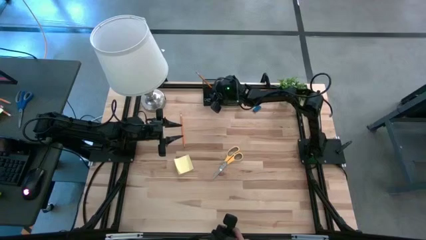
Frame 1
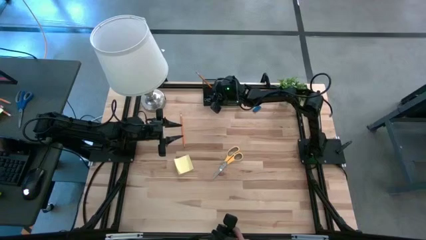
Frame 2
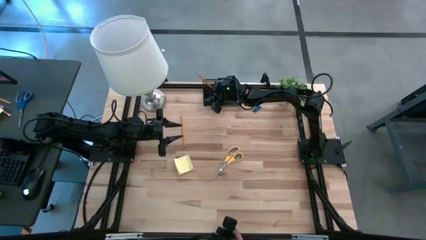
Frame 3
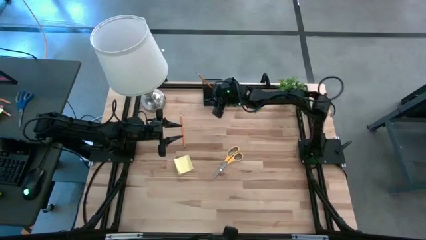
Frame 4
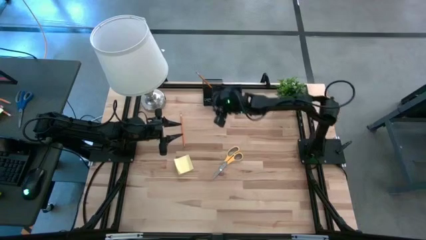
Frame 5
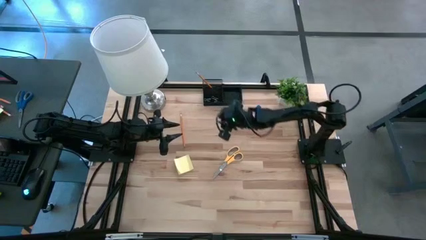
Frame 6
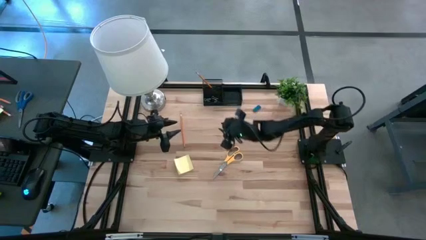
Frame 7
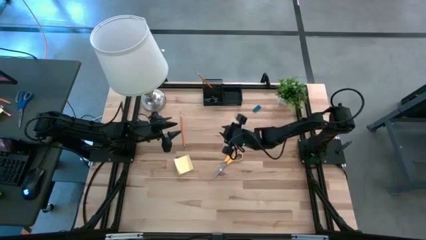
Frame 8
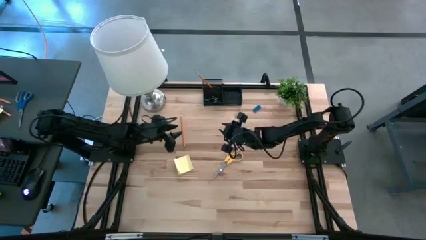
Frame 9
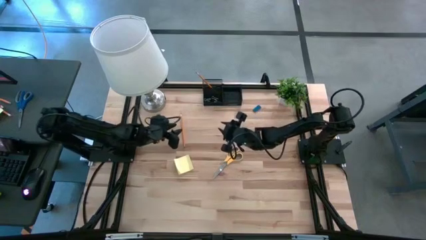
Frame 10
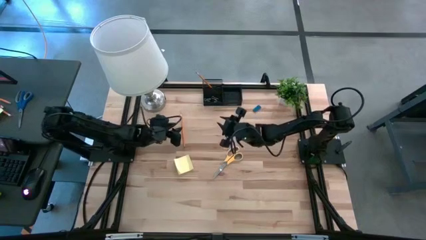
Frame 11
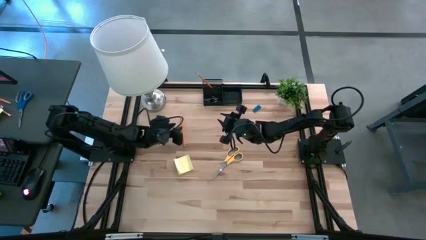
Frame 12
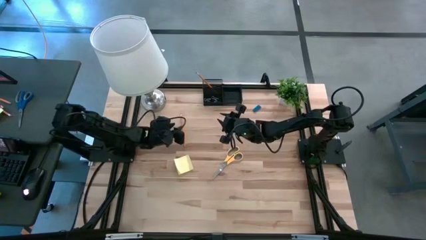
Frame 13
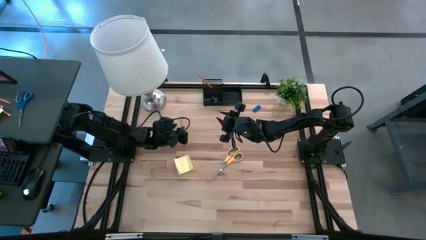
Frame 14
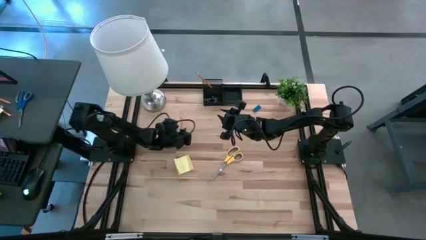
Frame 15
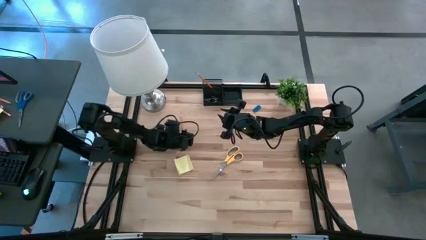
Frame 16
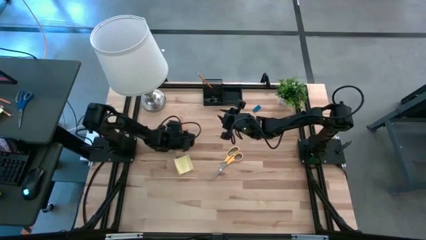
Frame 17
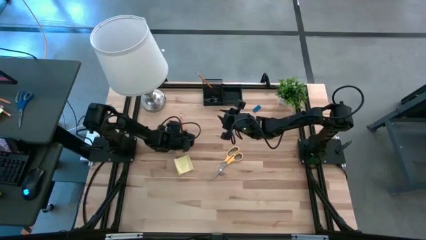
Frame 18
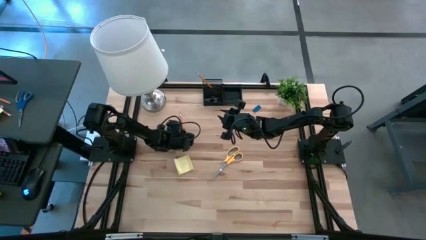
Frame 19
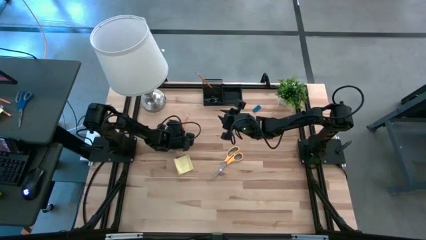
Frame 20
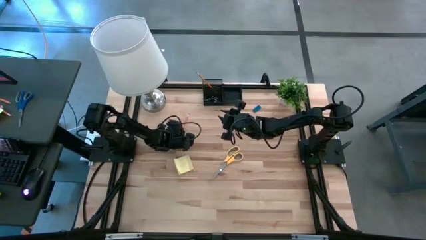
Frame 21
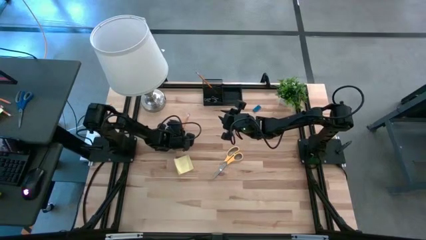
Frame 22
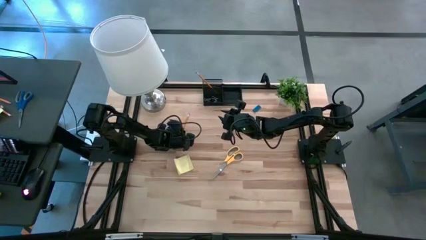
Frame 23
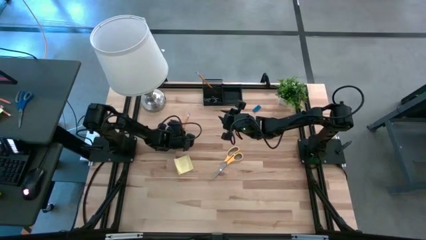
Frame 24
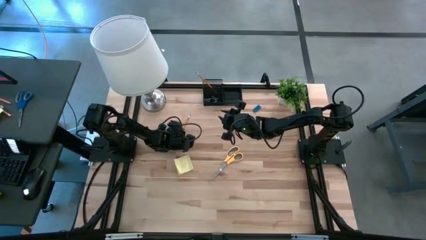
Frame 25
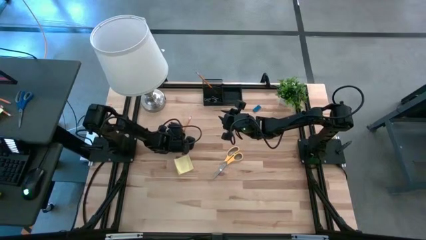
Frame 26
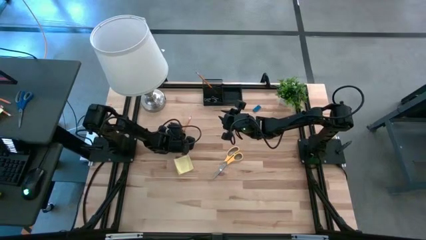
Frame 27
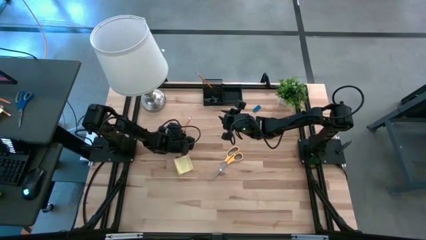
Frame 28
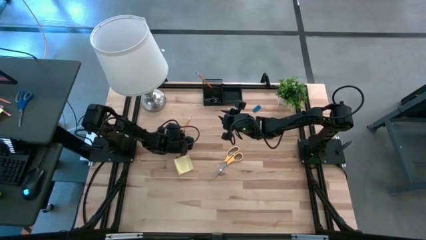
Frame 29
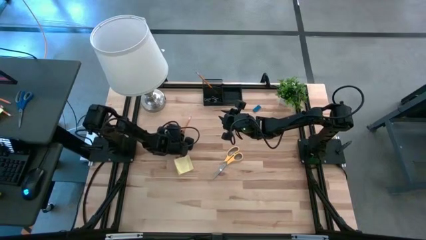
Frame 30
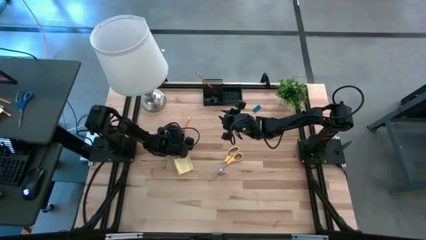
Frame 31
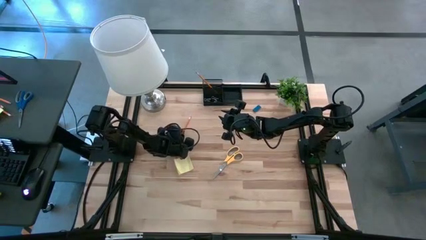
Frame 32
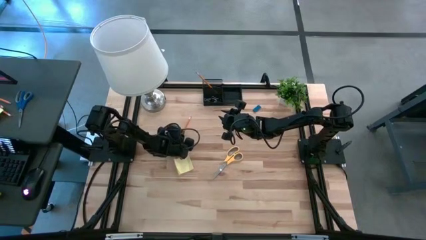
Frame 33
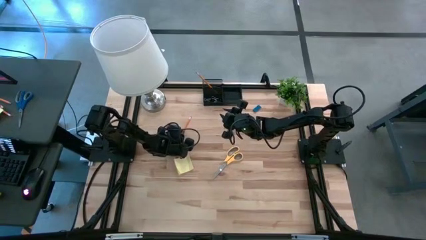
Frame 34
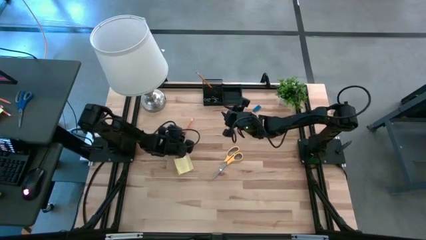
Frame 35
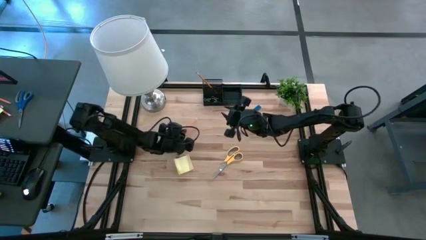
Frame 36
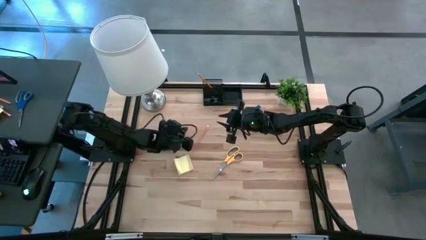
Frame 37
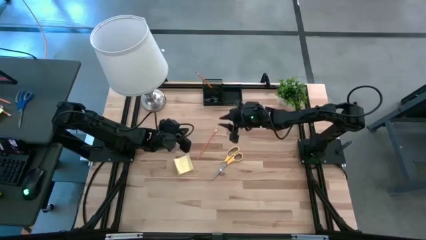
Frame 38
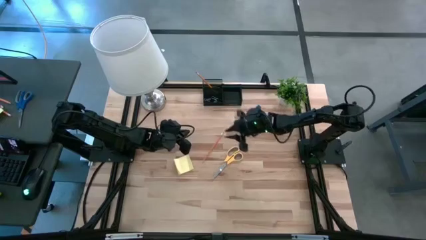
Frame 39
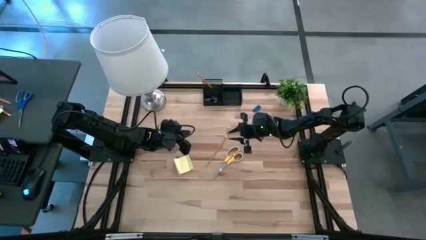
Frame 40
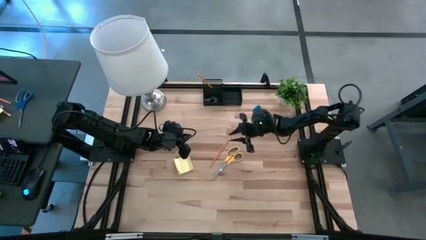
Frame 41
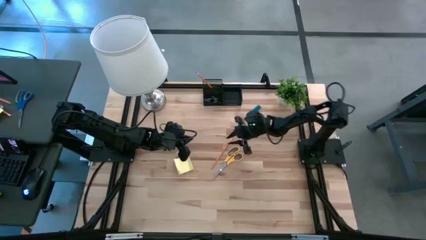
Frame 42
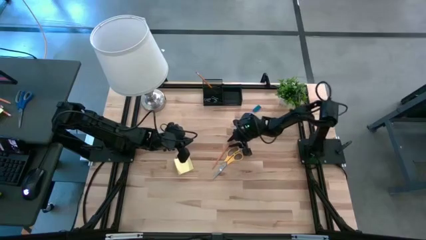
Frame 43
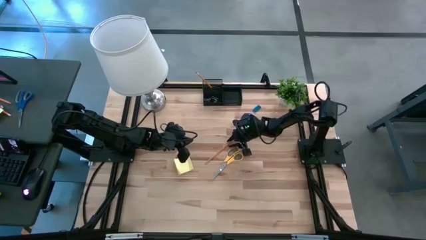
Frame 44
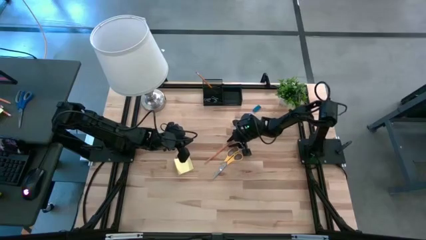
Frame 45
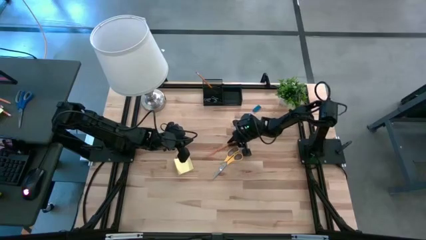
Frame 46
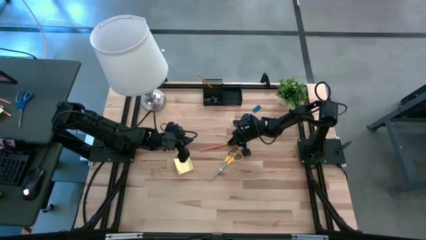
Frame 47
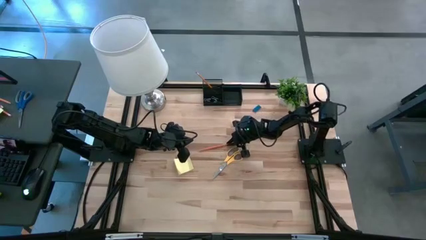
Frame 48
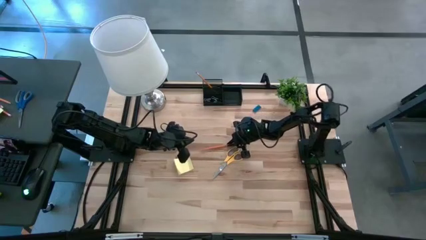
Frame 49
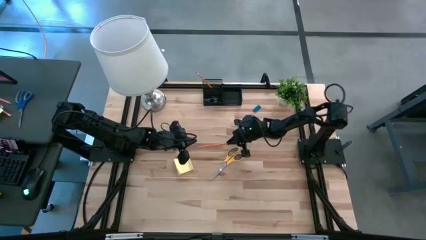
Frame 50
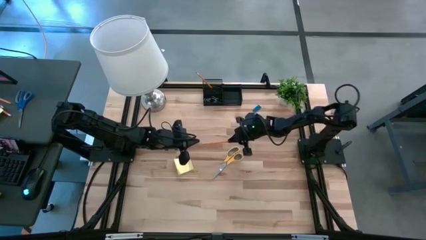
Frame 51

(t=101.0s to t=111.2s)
Task: Pick and place office supplies into organizer
Put the pencil into the desk organizer
